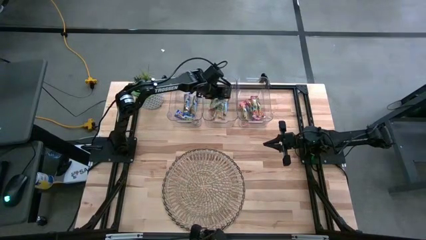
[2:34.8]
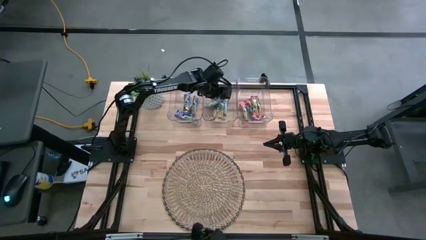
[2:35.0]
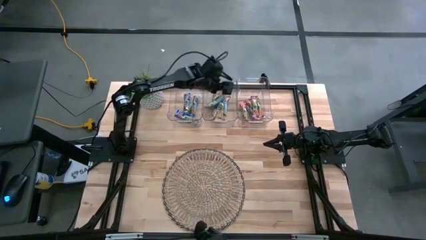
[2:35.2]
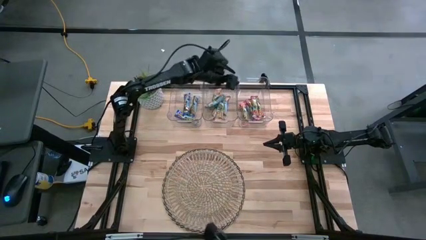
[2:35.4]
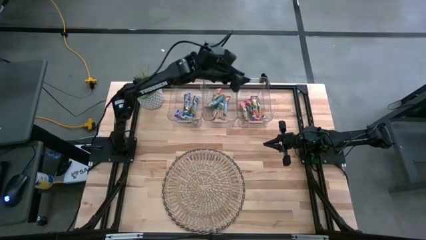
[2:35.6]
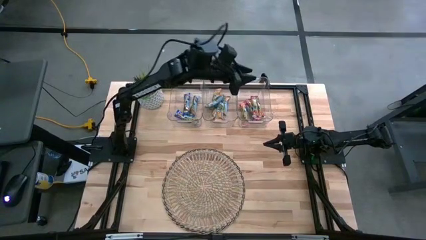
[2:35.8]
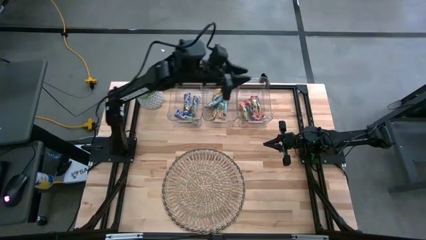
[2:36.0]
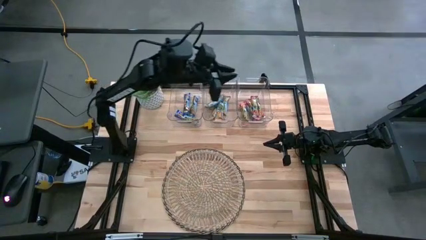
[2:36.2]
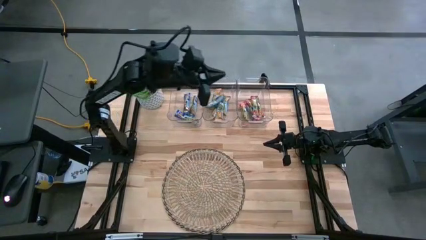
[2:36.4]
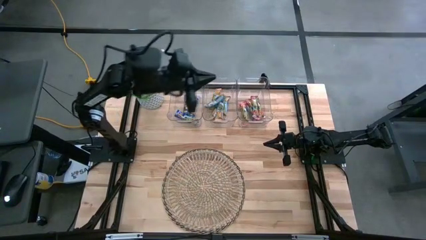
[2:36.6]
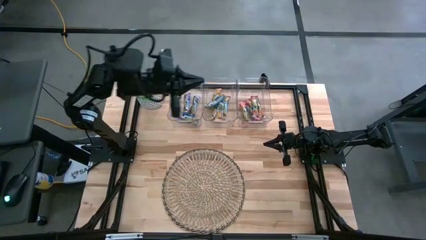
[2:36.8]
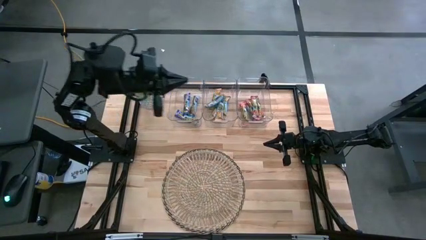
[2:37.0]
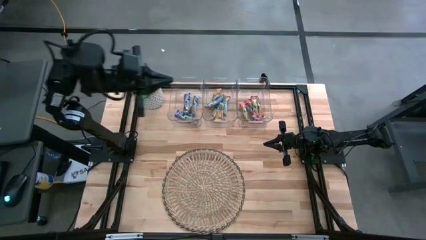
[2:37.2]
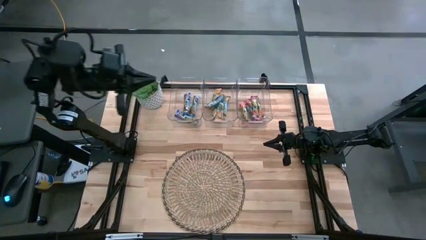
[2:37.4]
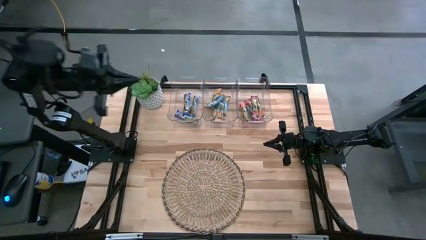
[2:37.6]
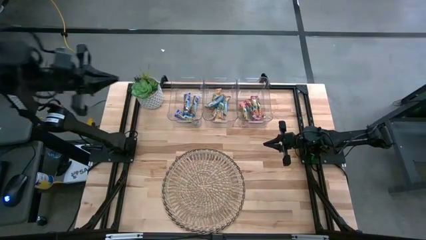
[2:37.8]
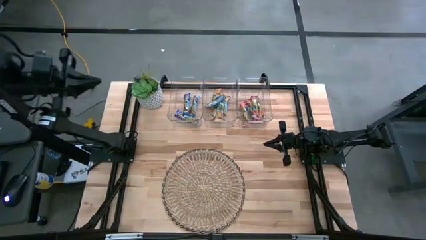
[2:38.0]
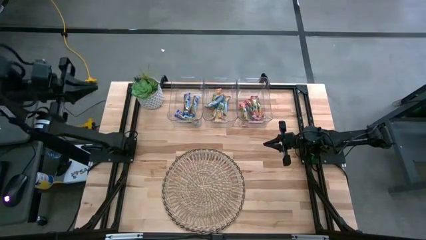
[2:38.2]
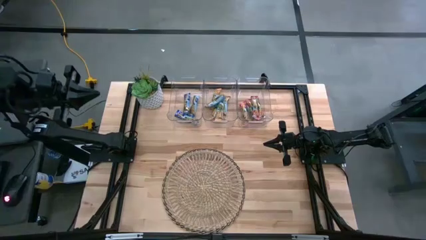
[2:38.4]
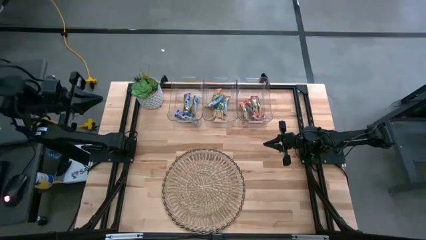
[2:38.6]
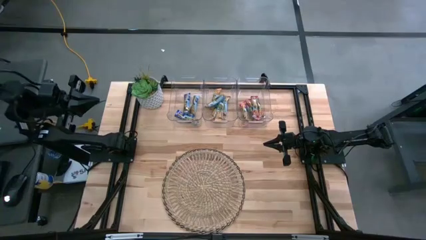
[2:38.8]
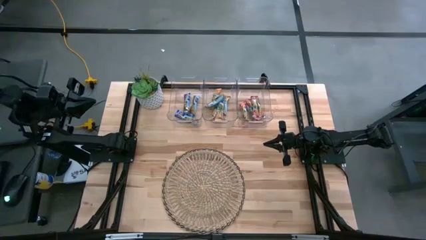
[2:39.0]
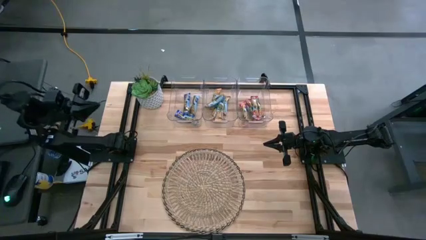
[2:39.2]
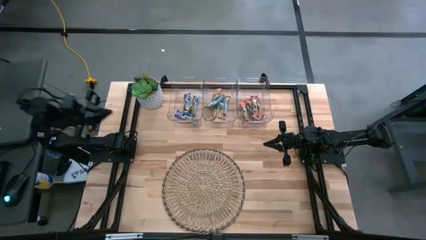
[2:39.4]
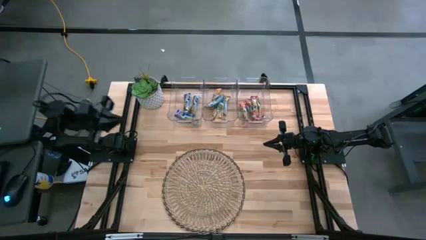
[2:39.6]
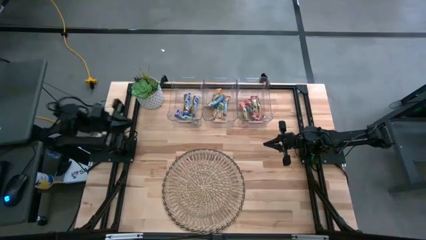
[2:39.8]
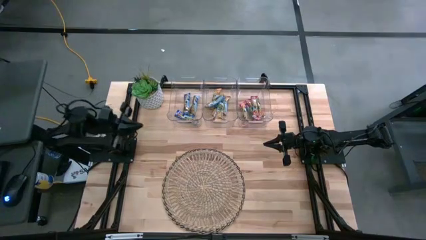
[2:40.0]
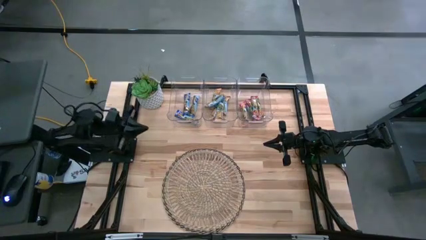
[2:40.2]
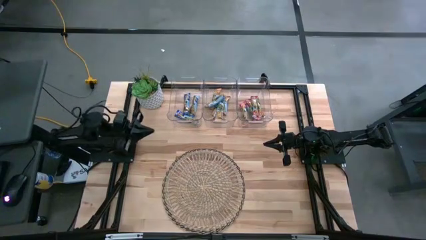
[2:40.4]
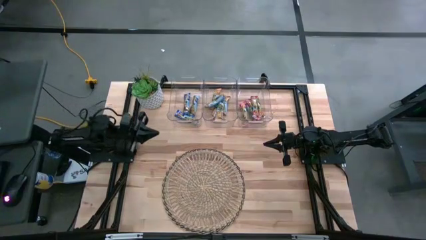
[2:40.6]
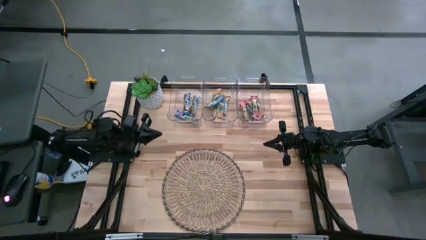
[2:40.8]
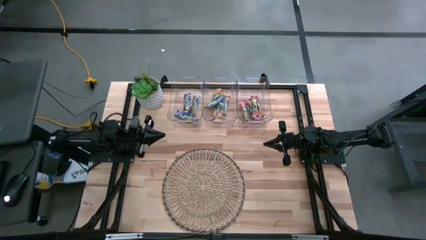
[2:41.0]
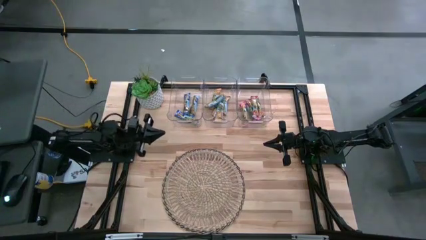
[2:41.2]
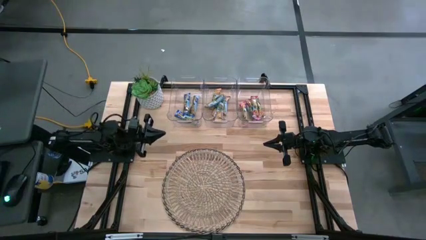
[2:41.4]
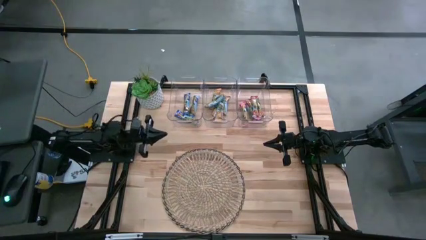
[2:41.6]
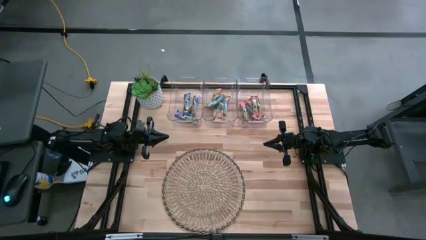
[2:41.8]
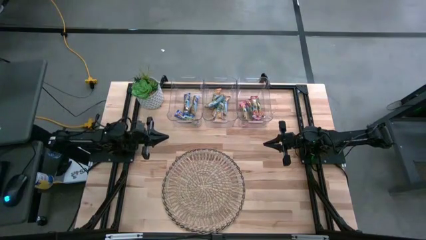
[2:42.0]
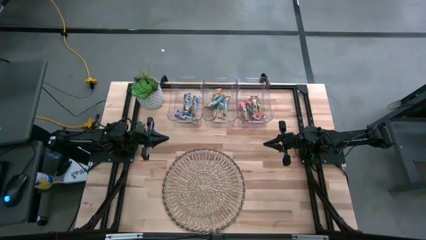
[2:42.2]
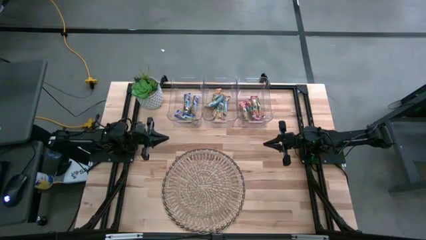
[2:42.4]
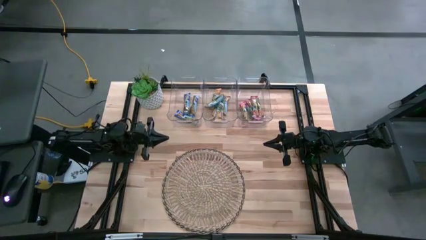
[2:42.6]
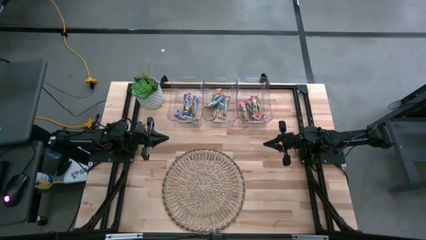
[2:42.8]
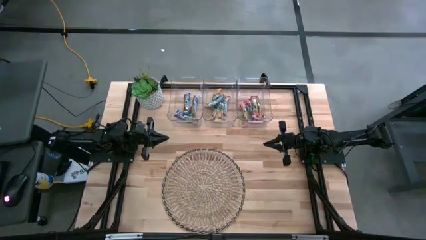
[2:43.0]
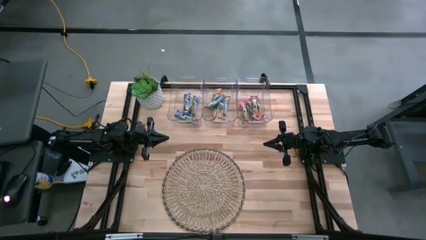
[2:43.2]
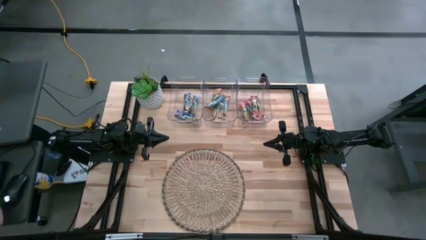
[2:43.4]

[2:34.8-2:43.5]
Task: Pick and place Granola Bars by type
Return to Home Position

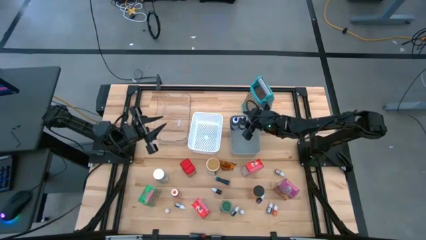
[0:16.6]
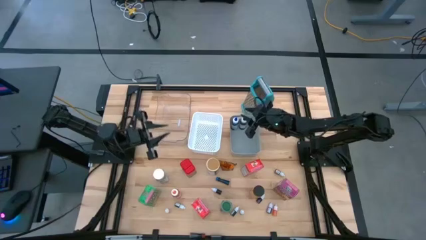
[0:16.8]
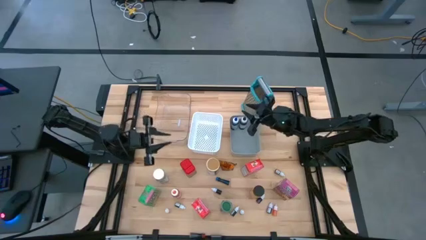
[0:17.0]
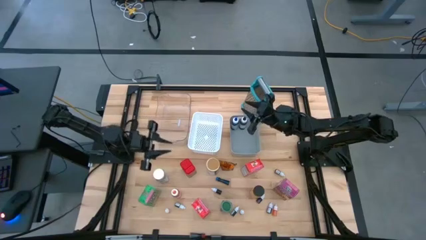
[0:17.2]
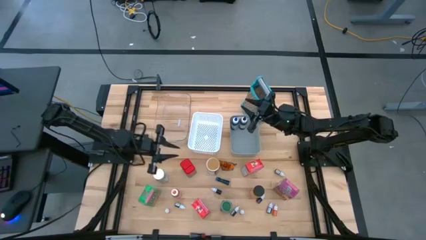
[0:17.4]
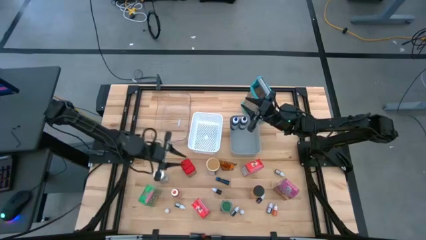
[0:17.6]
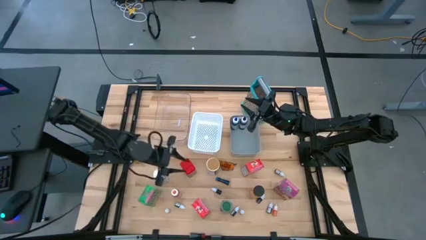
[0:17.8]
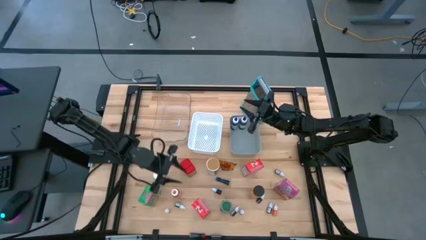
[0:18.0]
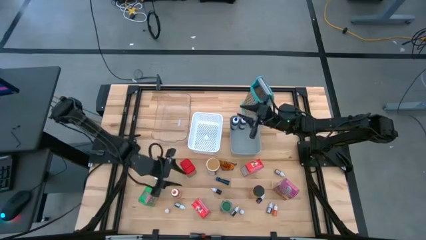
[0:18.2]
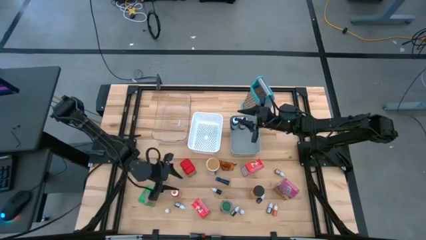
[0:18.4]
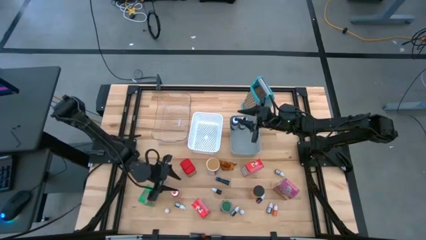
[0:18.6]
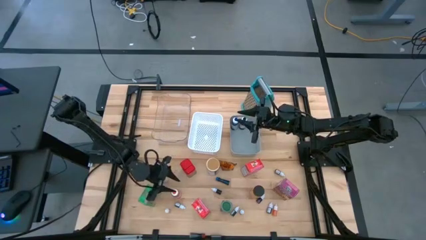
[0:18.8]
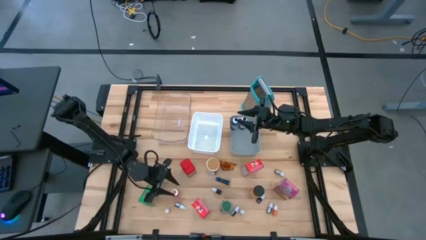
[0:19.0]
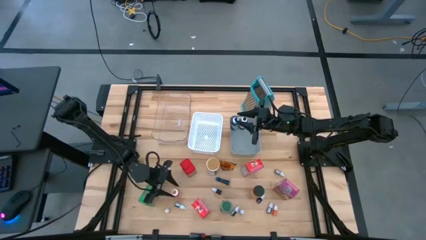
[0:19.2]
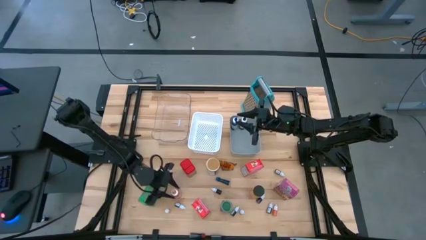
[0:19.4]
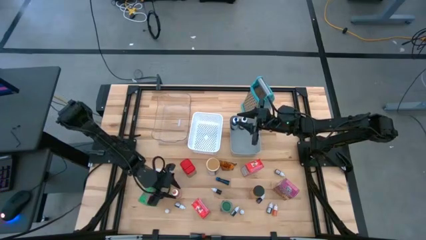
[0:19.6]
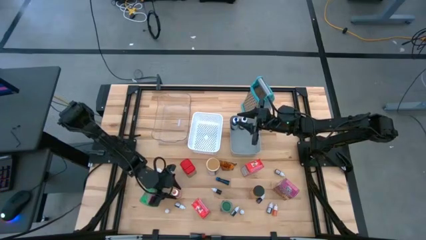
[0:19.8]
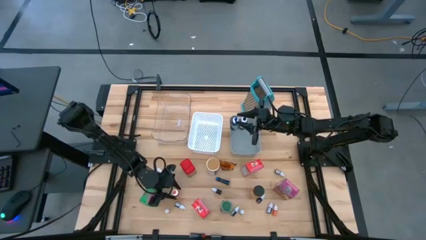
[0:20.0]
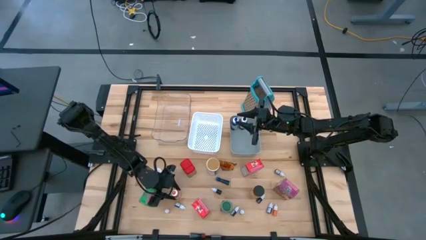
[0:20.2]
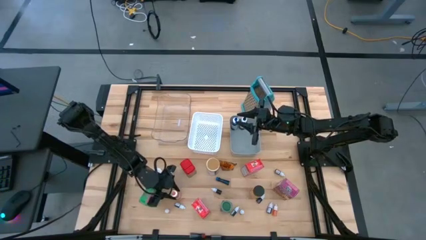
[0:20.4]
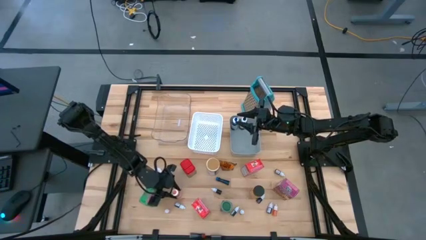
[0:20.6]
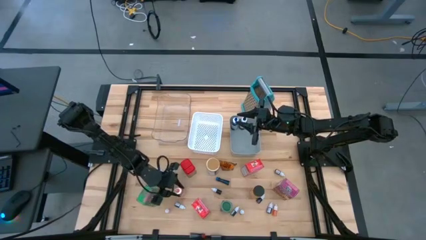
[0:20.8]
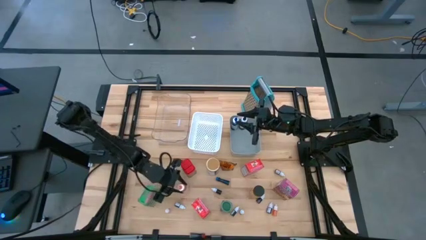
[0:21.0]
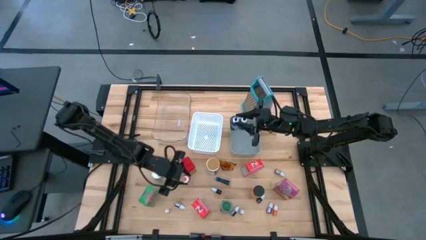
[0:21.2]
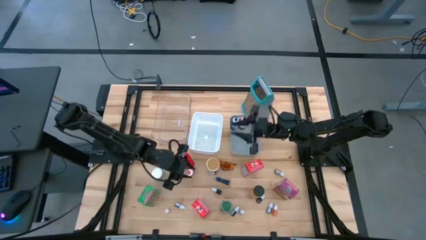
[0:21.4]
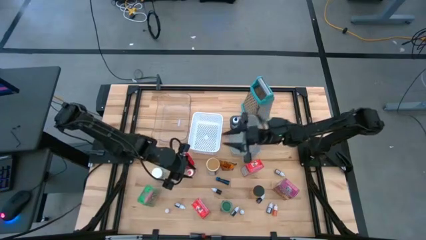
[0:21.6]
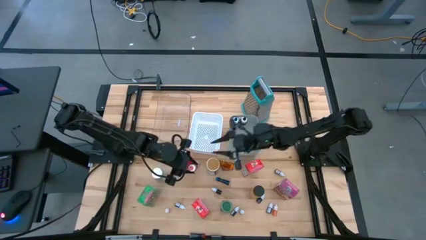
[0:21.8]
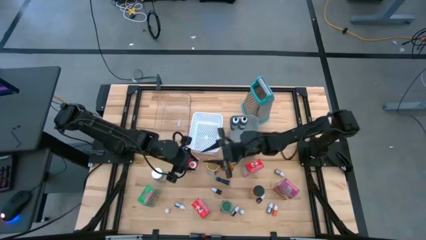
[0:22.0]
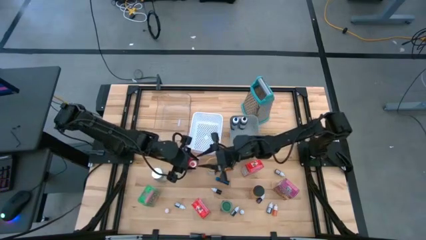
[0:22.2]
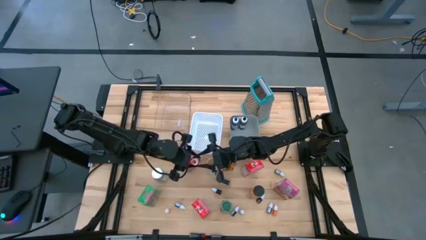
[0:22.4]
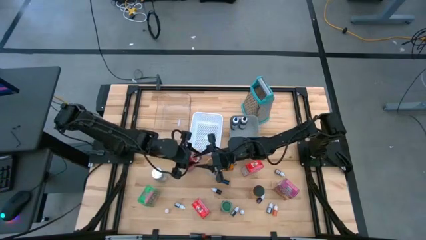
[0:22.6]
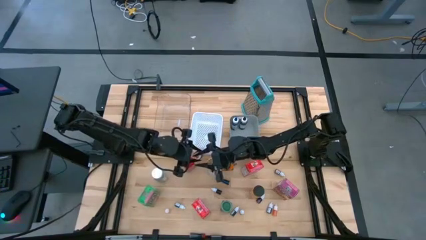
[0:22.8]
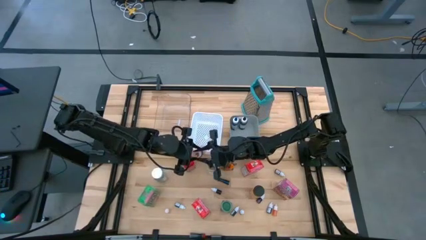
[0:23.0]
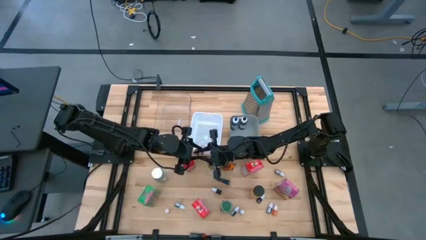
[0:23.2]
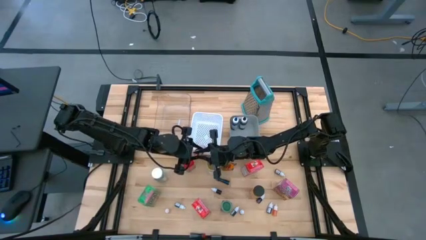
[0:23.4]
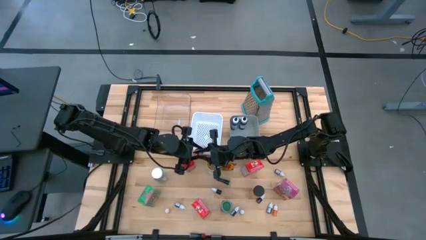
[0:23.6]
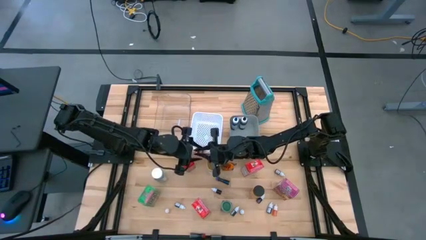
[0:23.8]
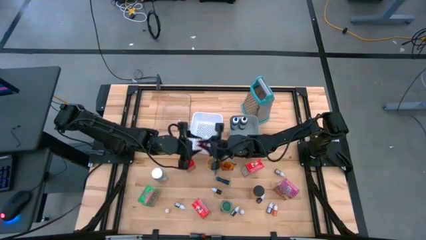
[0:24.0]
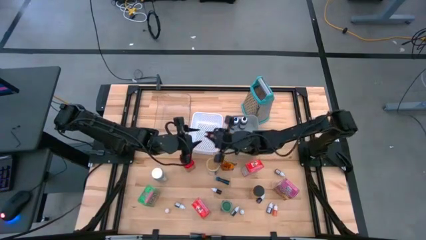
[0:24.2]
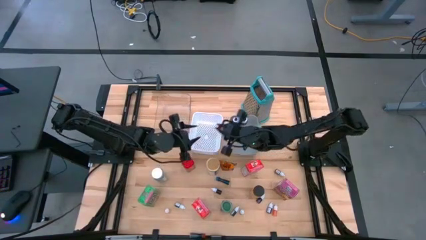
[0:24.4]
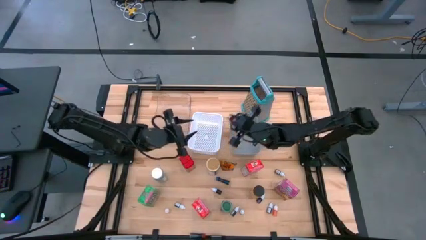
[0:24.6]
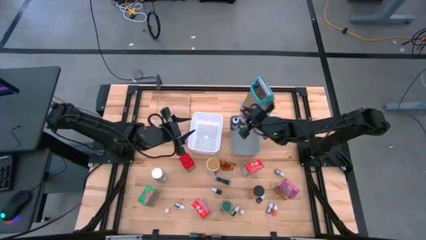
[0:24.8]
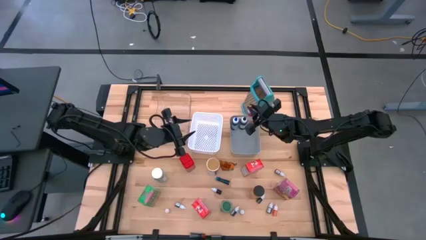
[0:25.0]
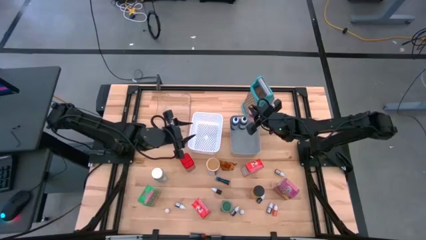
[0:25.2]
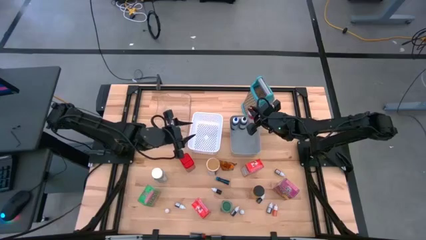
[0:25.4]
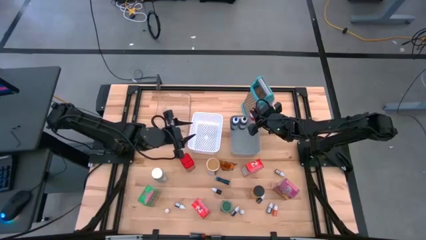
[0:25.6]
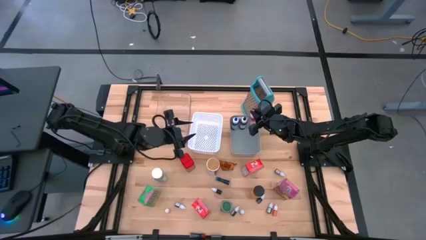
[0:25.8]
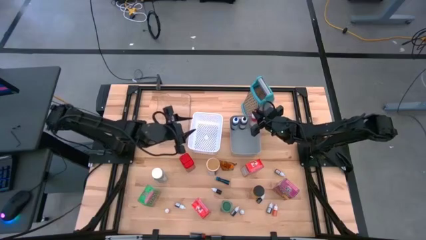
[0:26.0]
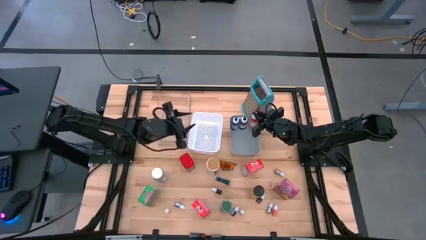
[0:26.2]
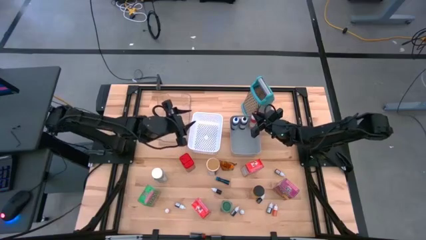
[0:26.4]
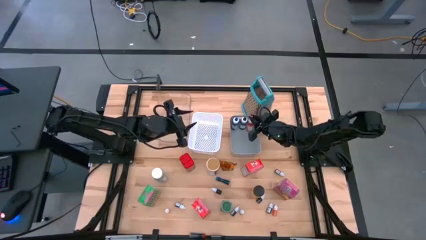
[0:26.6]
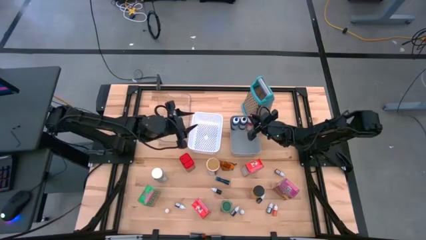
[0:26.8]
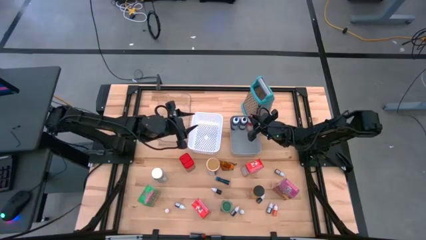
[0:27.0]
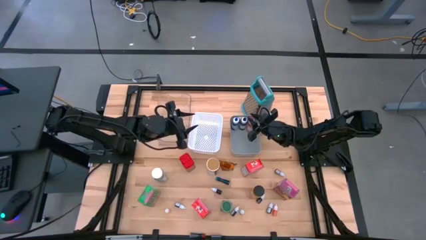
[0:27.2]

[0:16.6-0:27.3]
Task: Pick & Place Kitchen Items
Put the large orange food coloring into the gray bin
